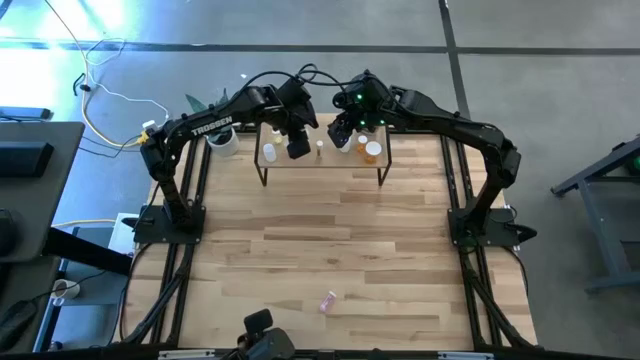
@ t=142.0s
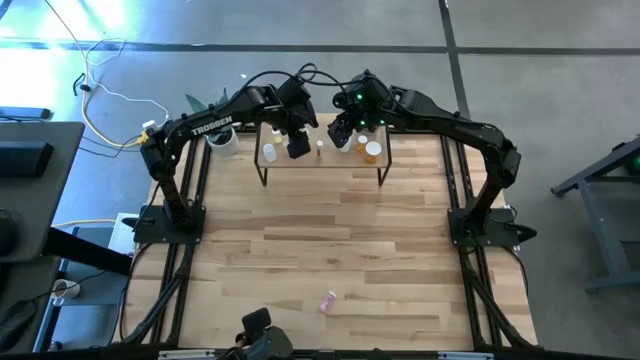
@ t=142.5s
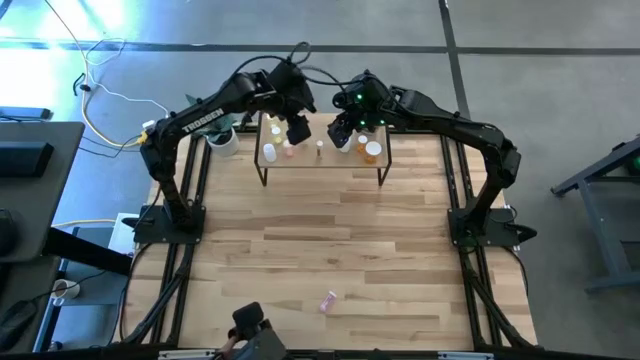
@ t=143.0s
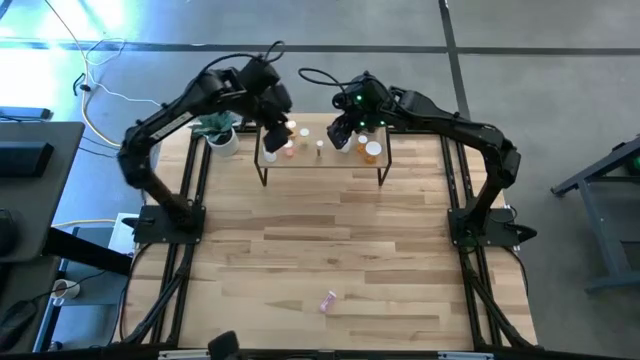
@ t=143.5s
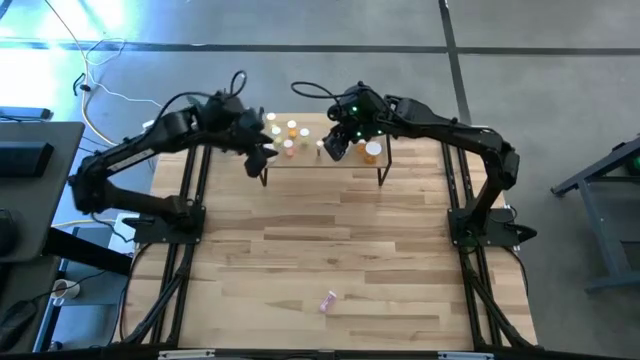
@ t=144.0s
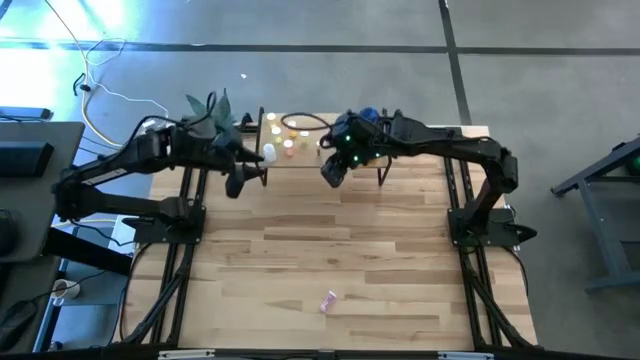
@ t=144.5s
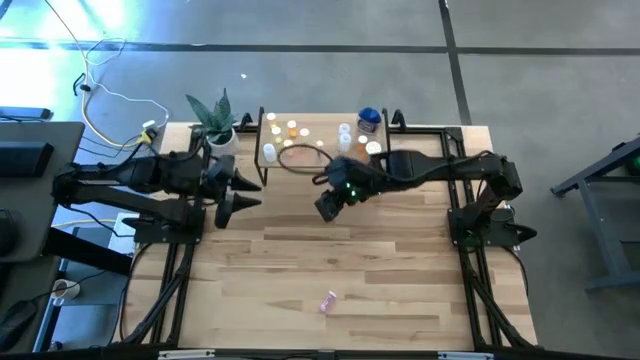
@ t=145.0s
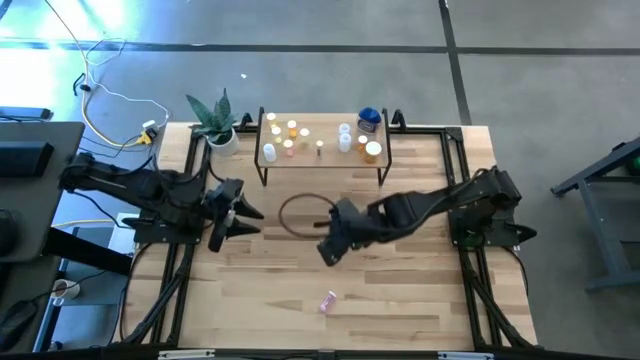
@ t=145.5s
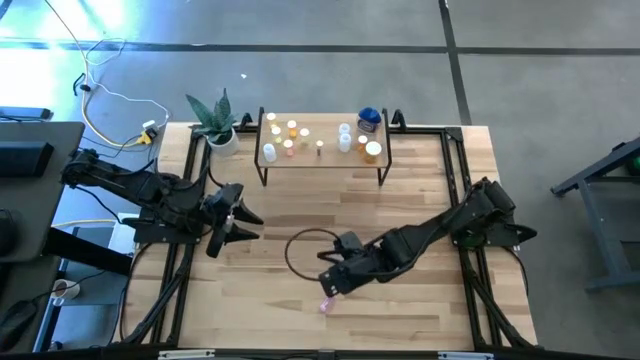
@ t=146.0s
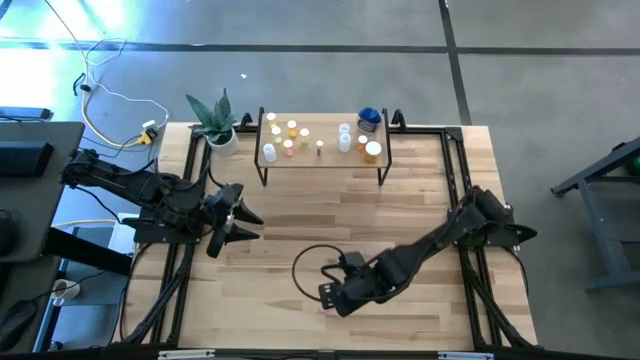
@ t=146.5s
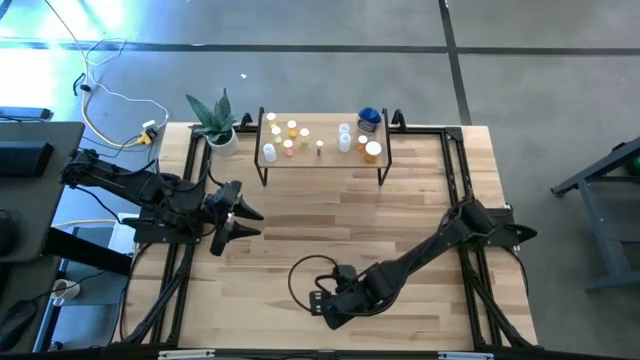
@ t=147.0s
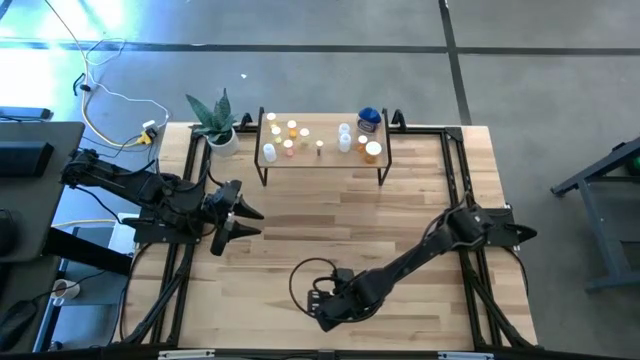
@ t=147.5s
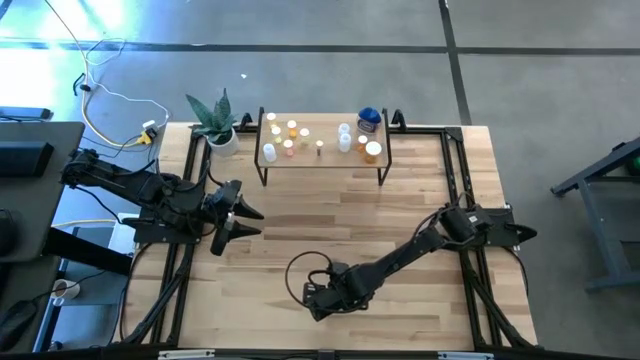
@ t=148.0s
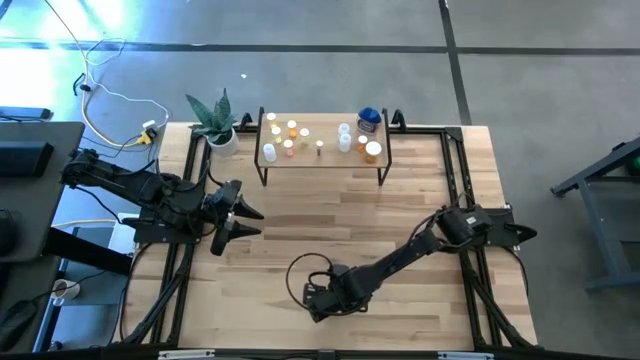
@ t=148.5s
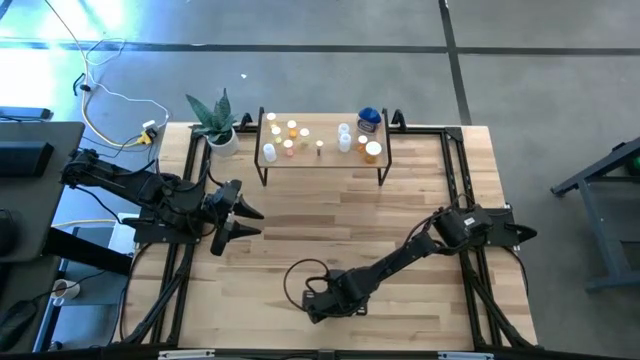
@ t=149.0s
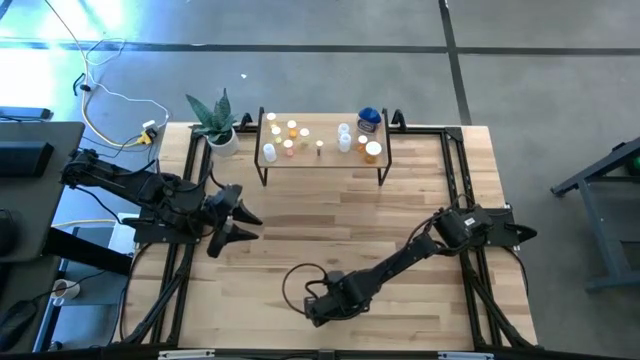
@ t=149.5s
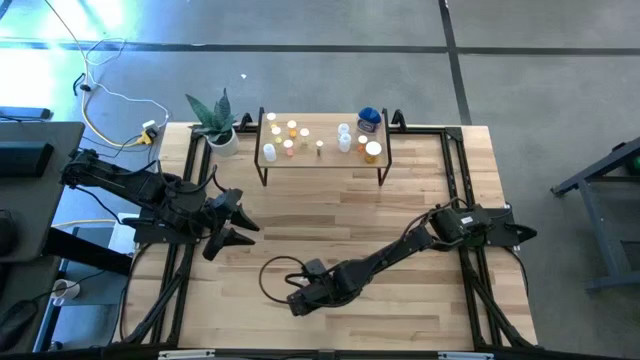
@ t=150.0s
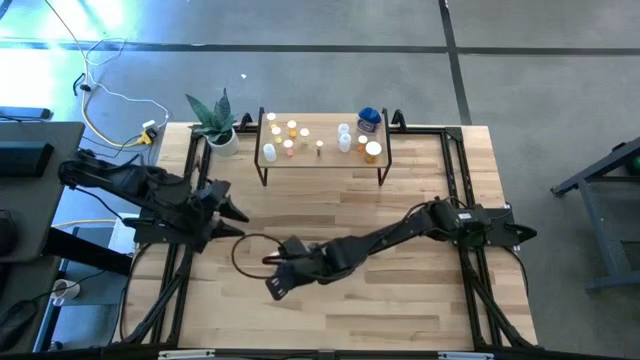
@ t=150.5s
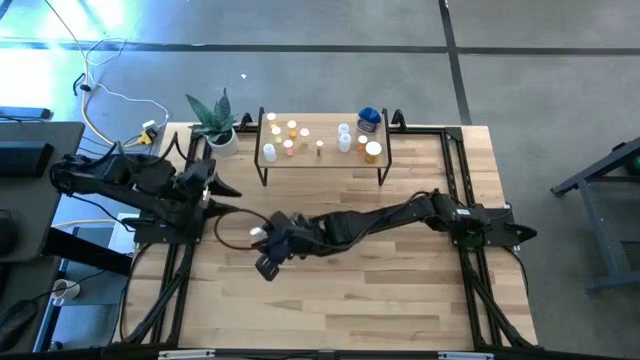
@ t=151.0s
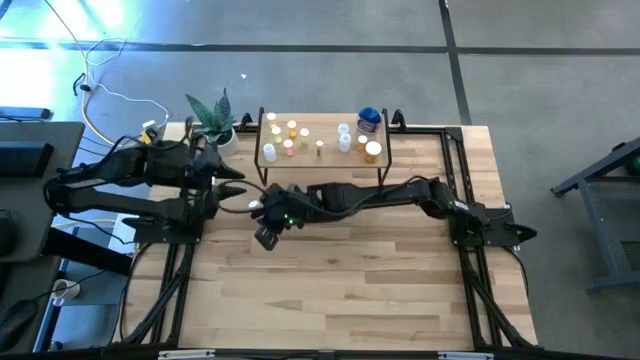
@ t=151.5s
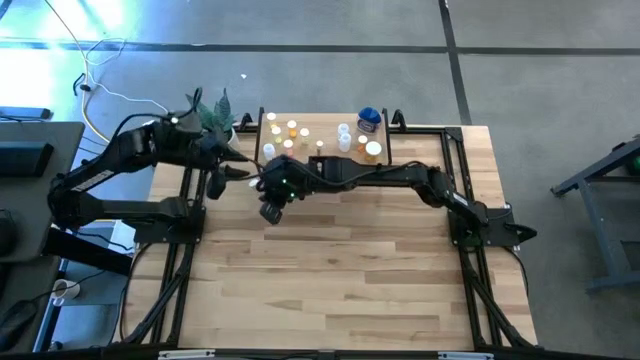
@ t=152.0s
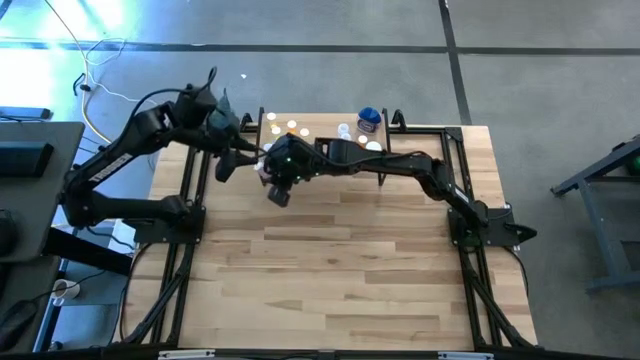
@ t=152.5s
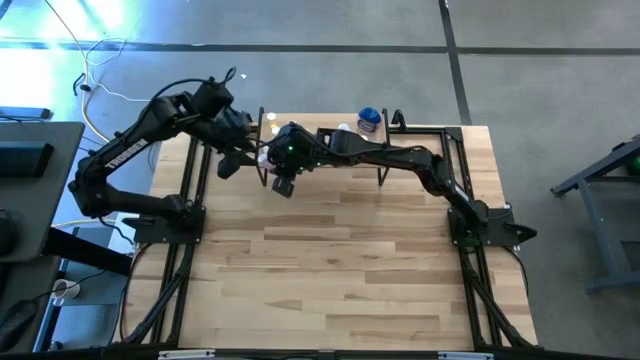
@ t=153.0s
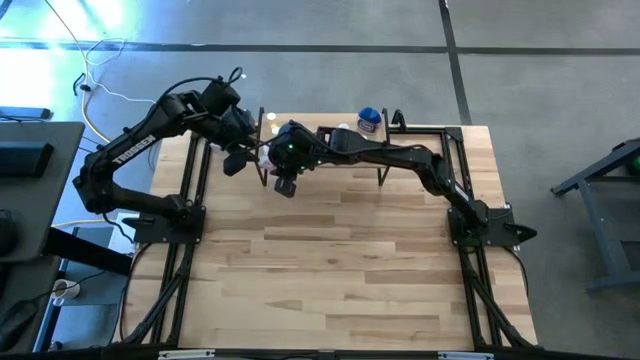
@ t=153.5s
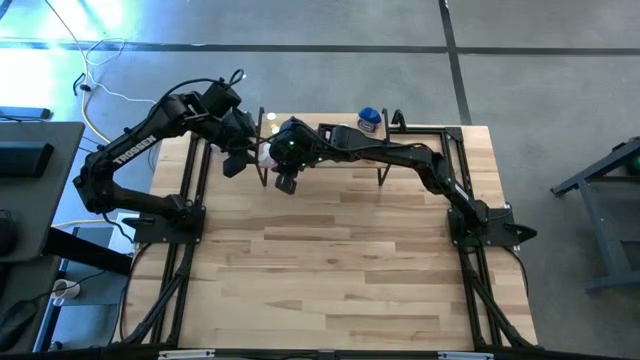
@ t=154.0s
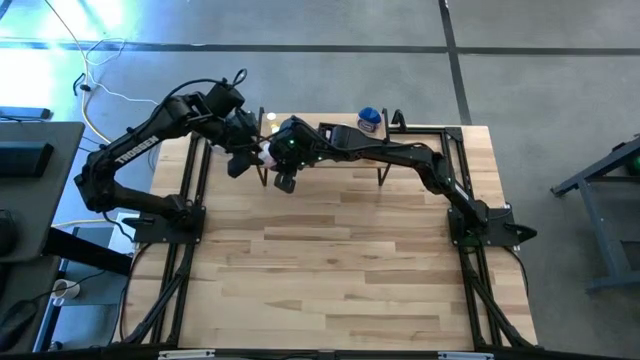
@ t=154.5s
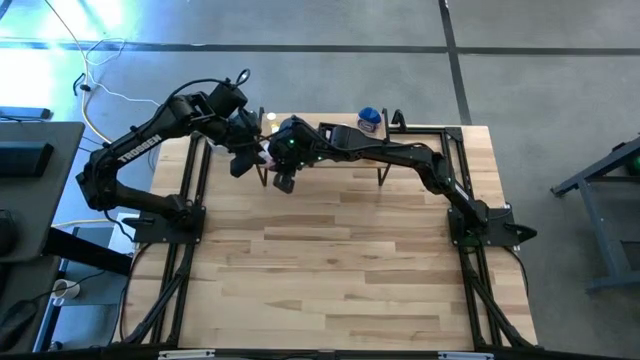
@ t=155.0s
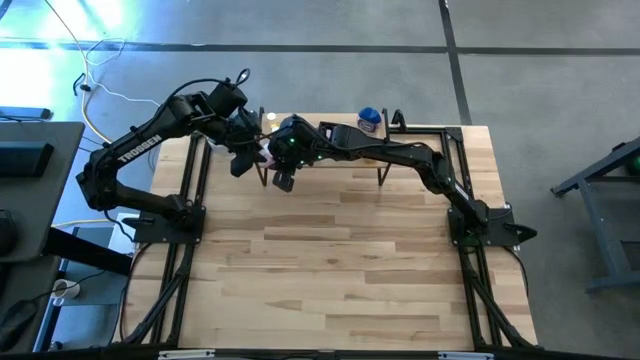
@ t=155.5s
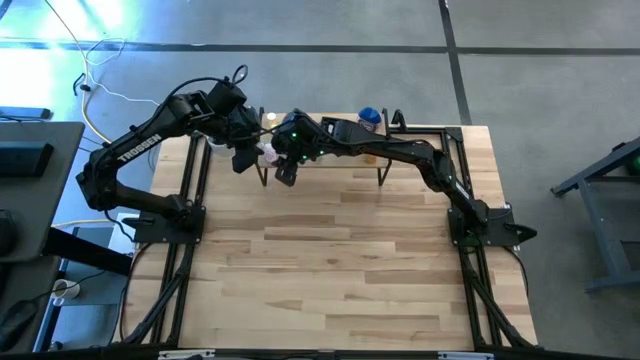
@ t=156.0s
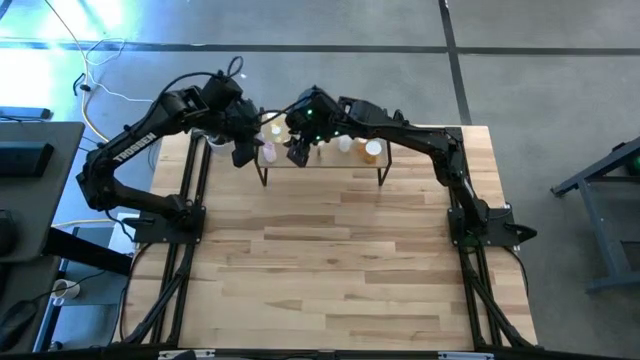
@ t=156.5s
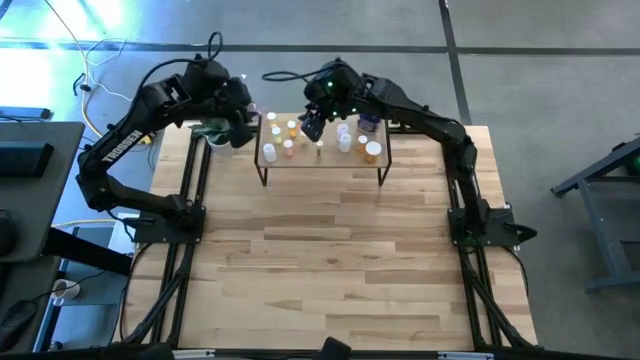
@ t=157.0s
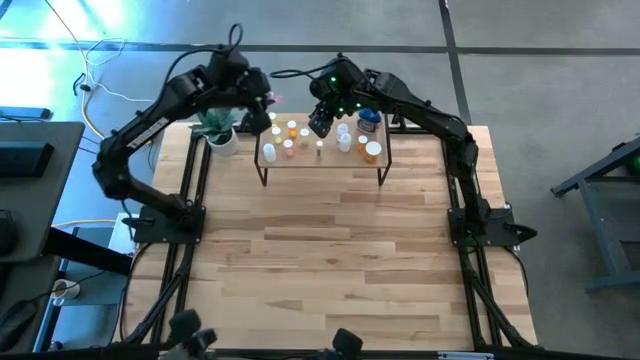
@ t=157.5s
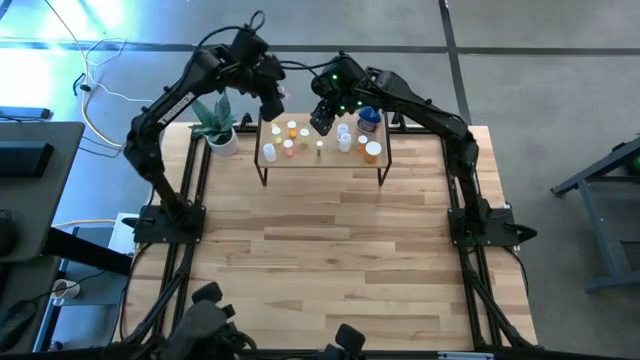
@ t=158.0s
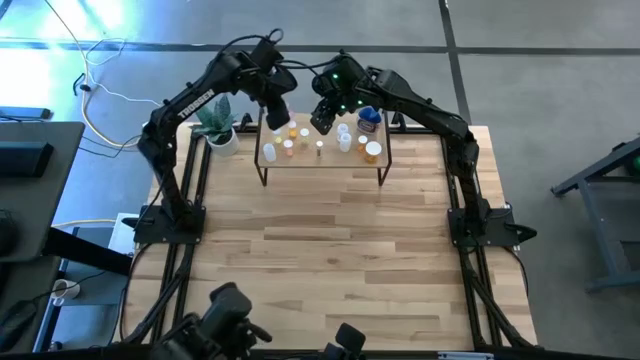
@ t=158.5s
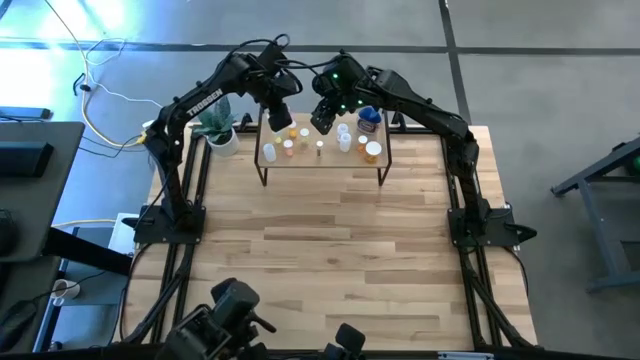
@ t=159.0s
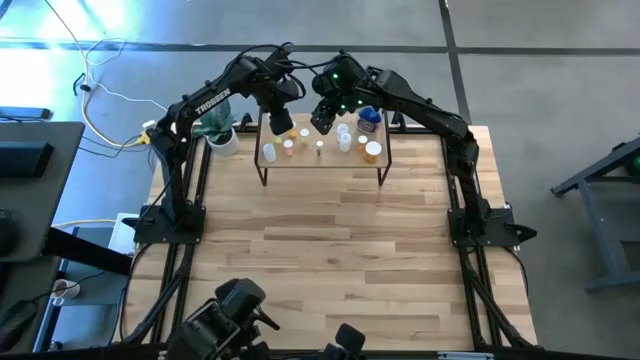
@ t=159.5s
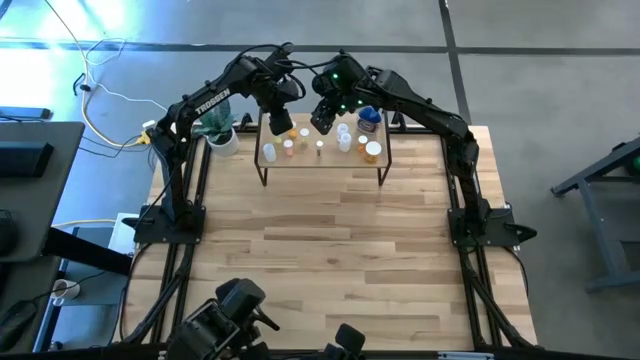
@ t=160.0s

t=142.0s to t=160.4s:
Task: Pick and place medicine bottles onto shelf by color
Put the small purple pill bottle on the shelf

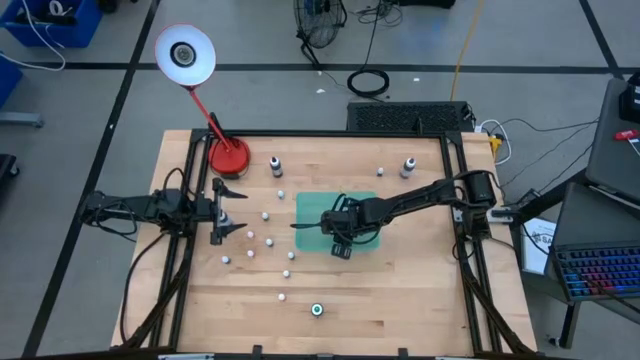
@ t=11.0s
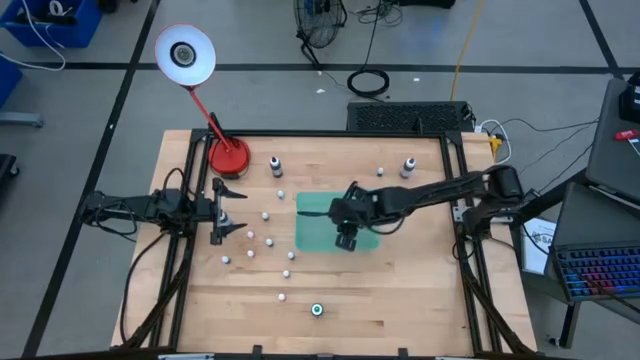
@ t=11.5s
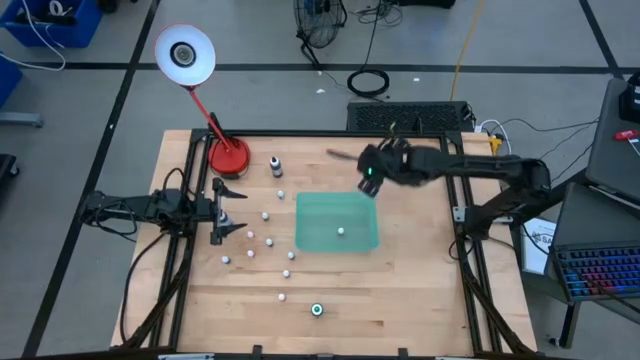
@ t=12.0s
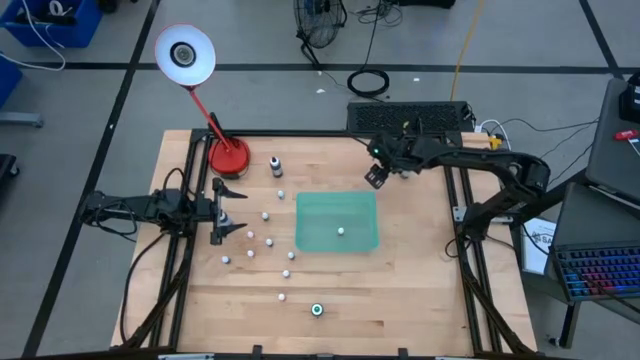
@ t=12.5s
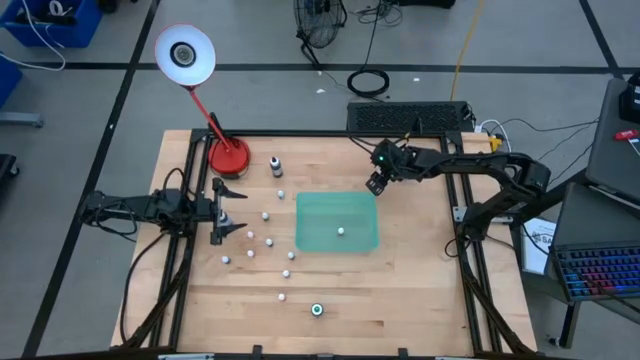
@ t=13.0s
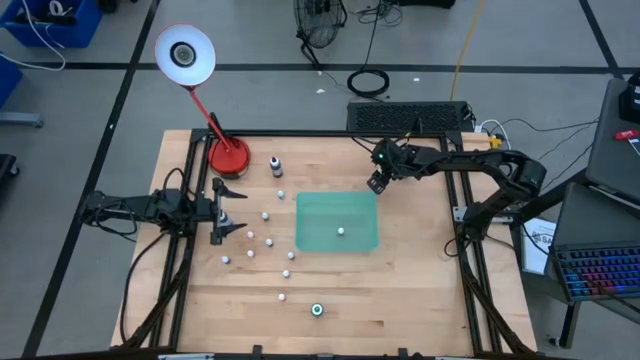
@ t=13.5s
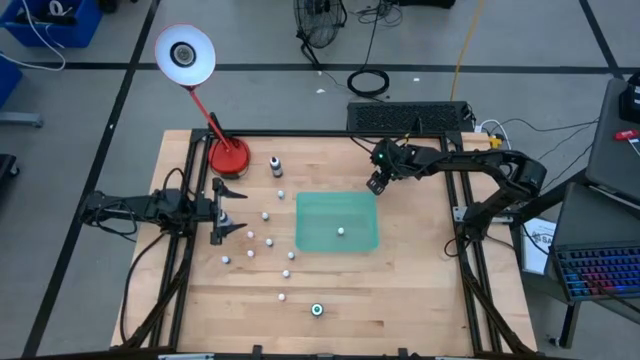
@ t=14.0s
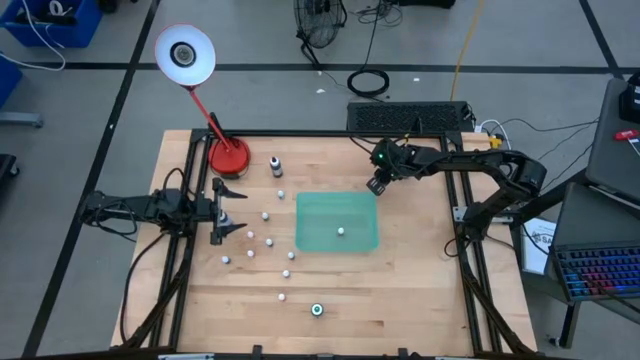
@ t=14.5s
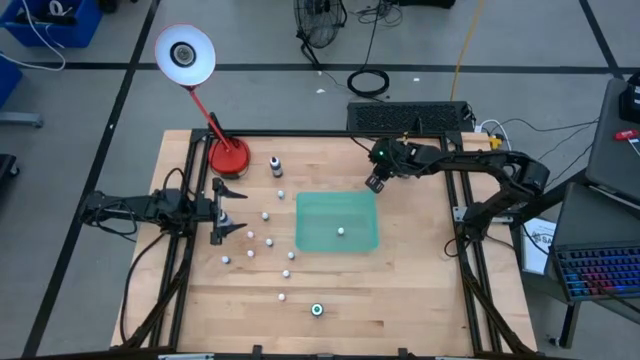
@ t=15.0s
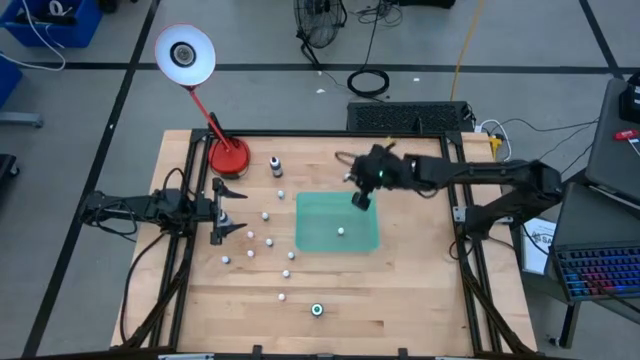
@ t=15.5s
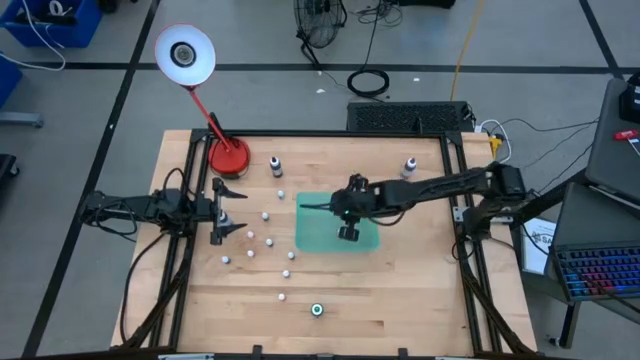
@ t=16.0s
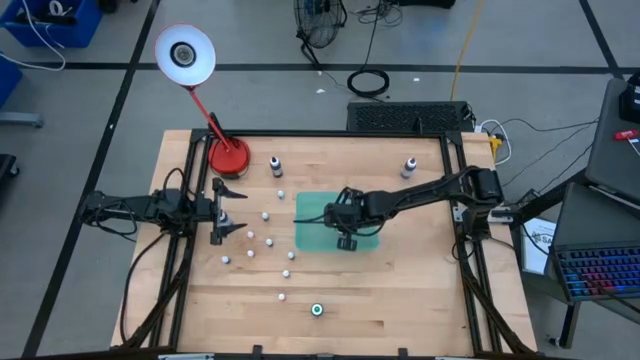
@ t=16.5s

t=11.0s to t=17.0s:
Task: Pick & Place food coloring
Put the small blue food coloring bottle into the blue bin
